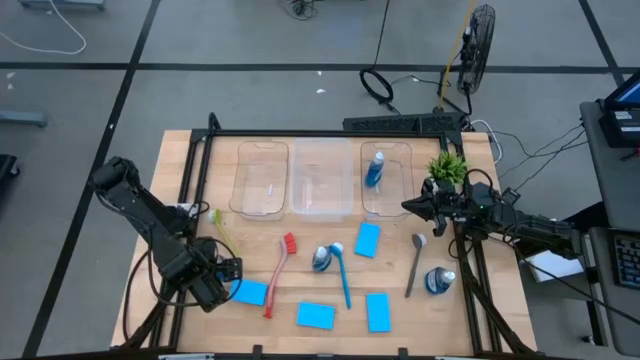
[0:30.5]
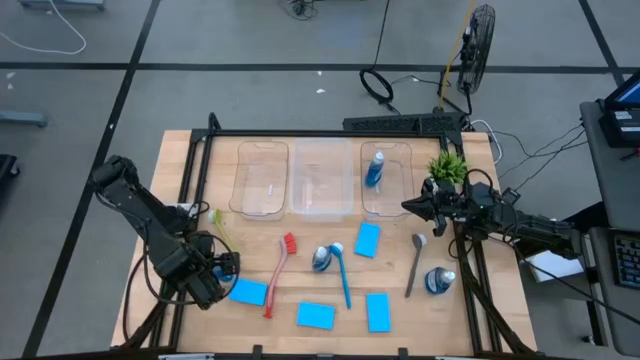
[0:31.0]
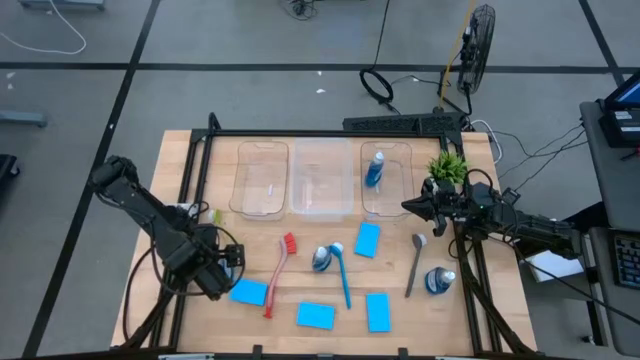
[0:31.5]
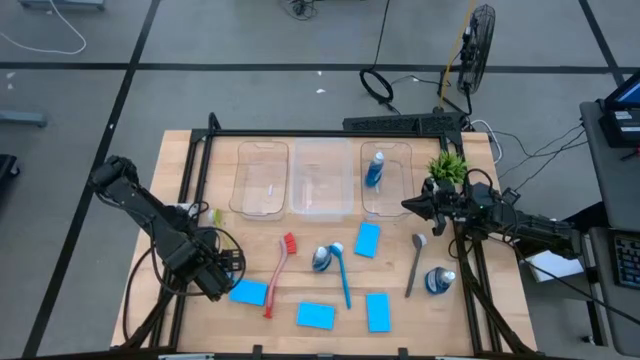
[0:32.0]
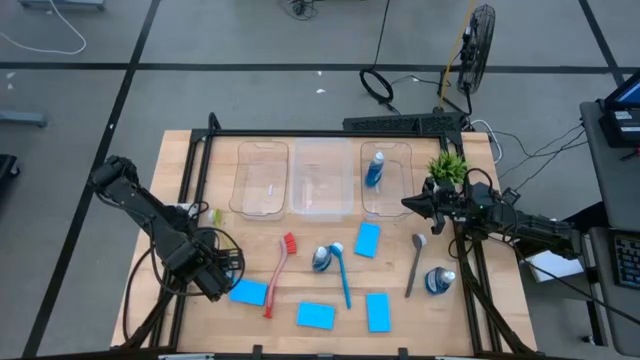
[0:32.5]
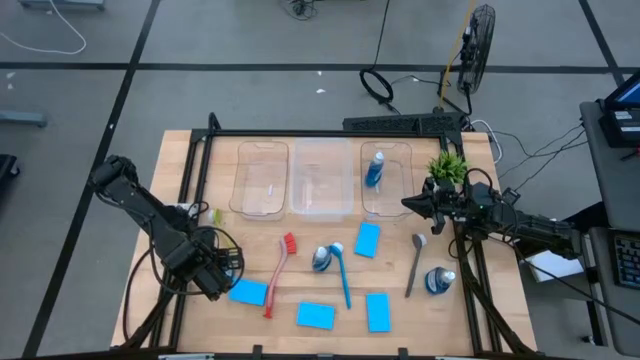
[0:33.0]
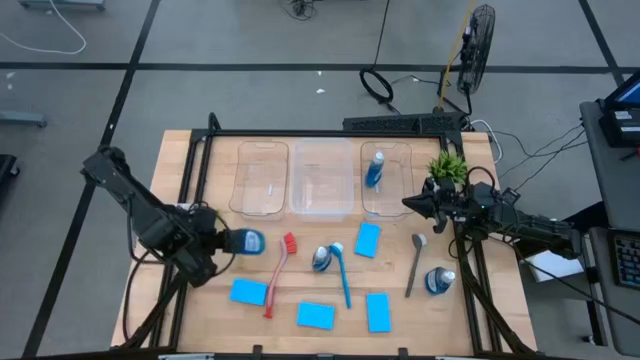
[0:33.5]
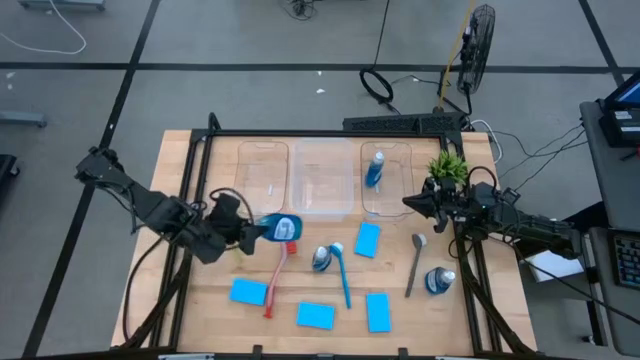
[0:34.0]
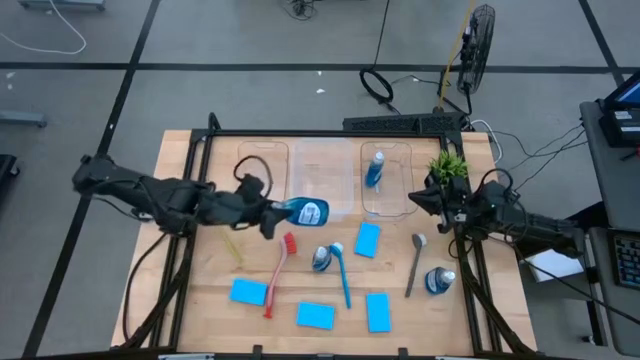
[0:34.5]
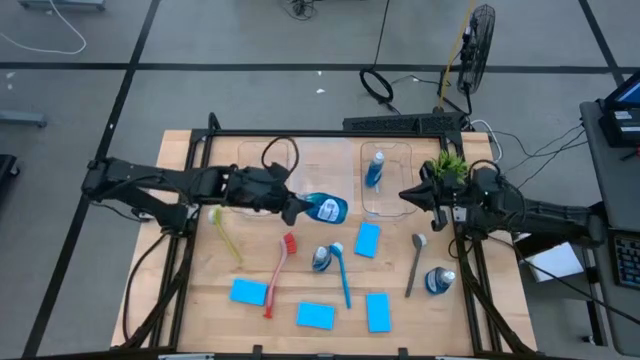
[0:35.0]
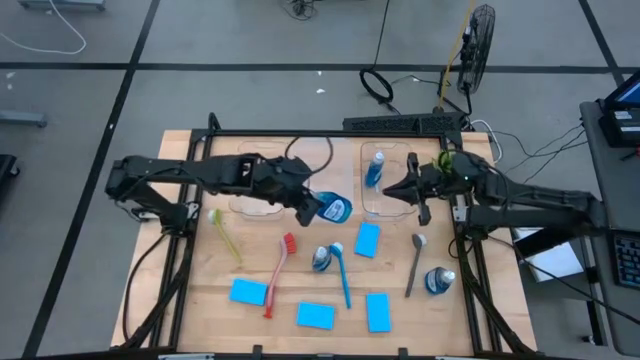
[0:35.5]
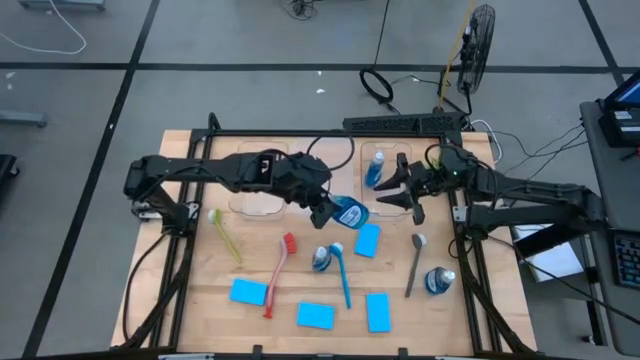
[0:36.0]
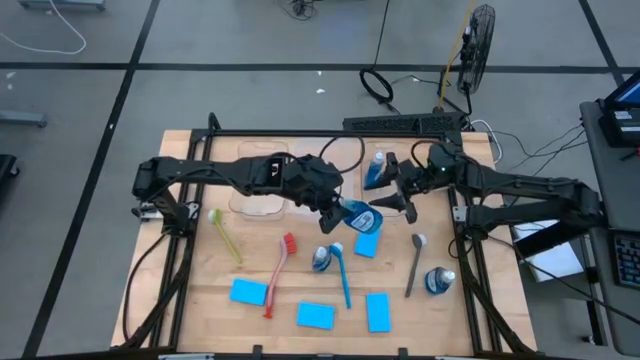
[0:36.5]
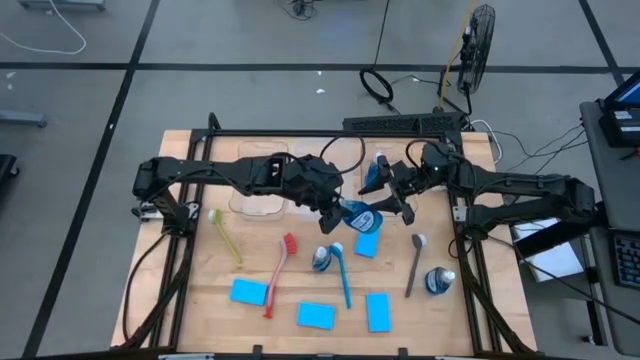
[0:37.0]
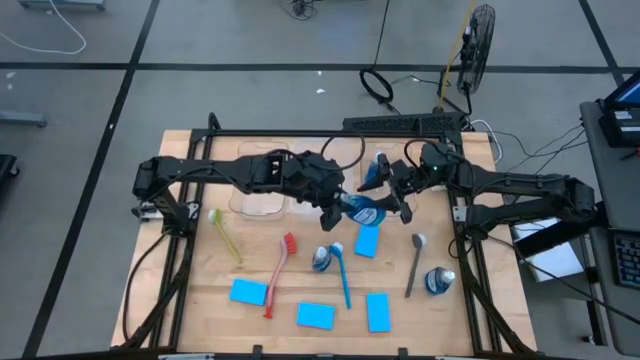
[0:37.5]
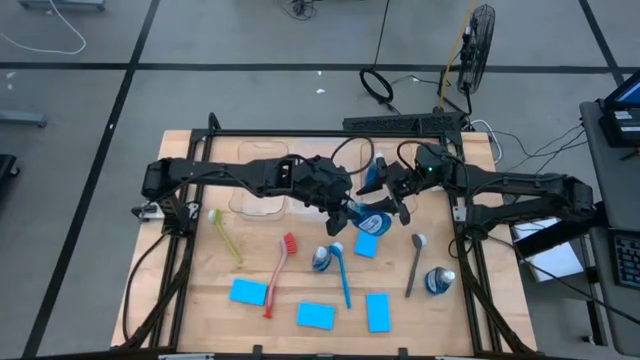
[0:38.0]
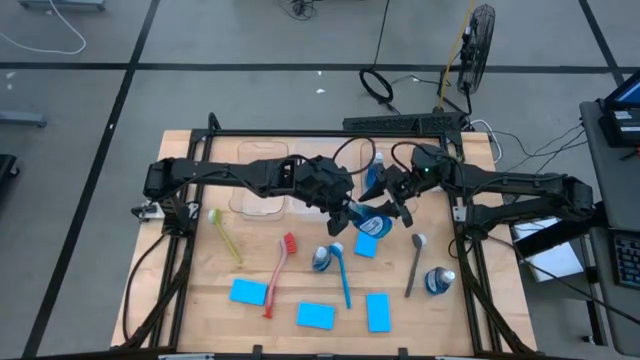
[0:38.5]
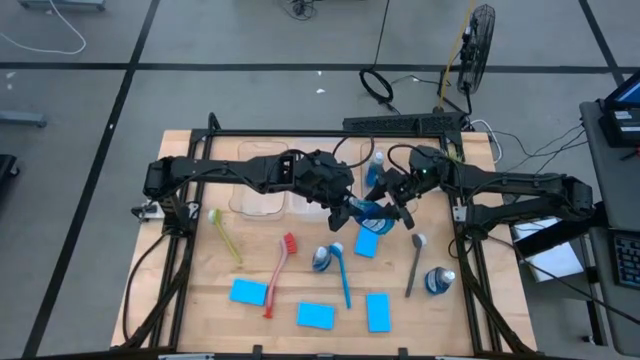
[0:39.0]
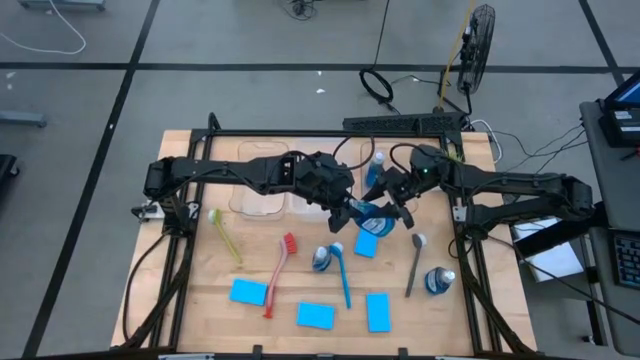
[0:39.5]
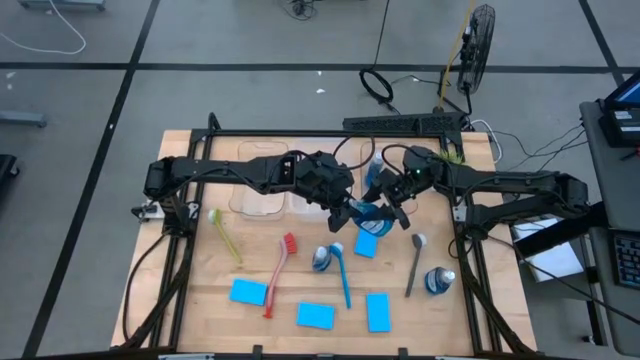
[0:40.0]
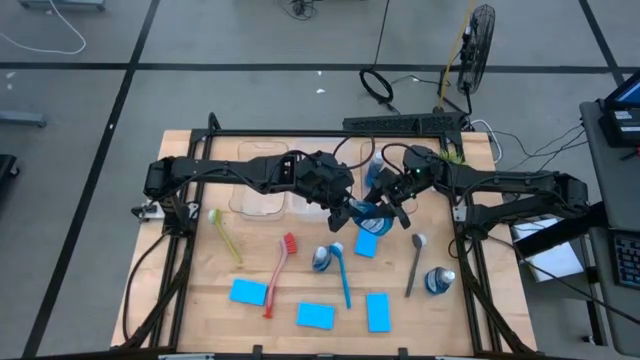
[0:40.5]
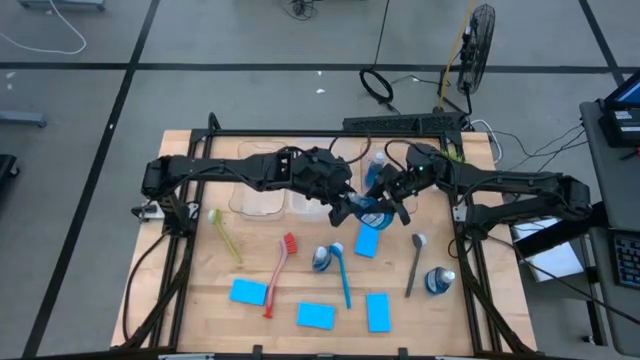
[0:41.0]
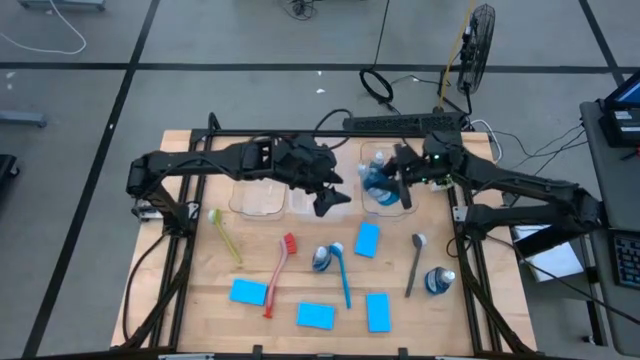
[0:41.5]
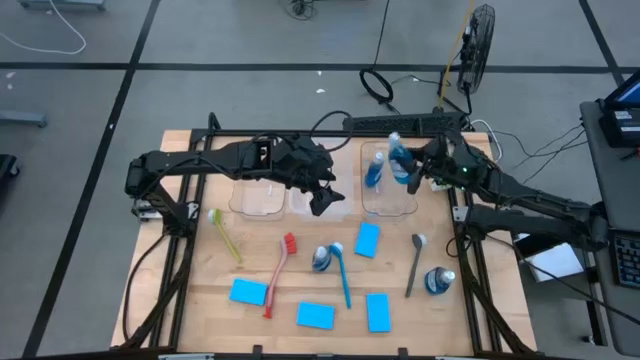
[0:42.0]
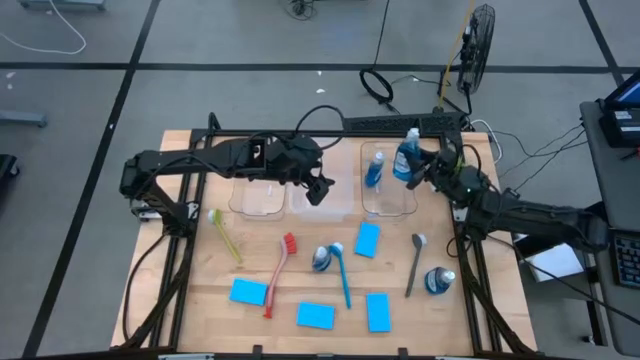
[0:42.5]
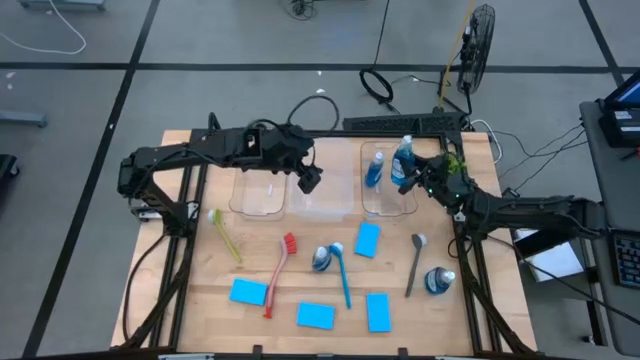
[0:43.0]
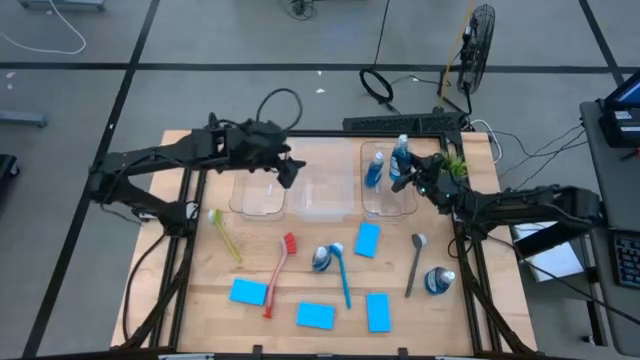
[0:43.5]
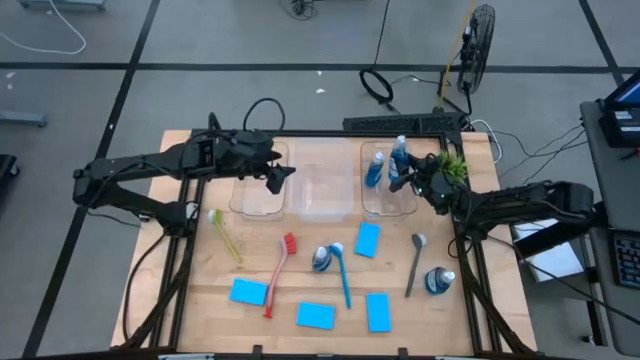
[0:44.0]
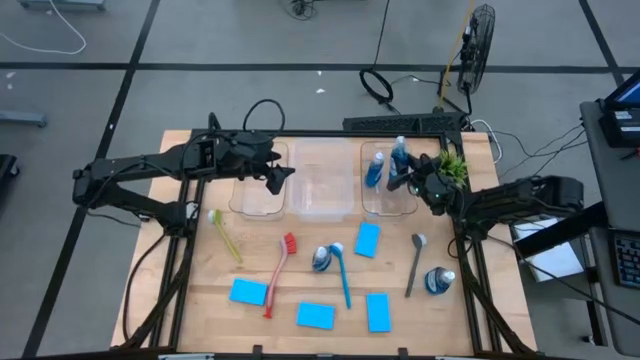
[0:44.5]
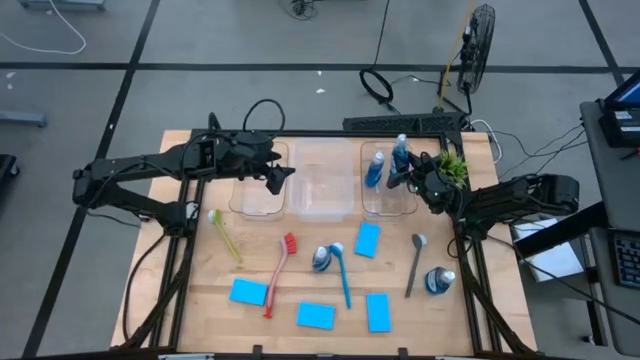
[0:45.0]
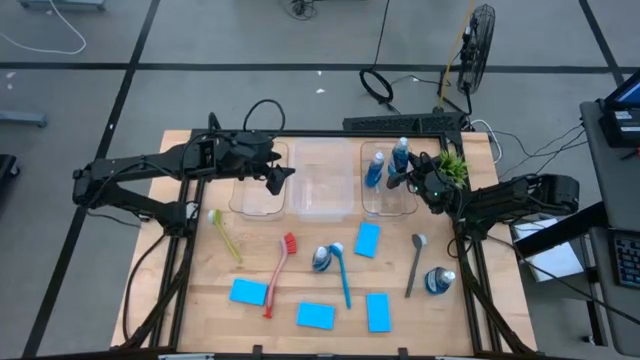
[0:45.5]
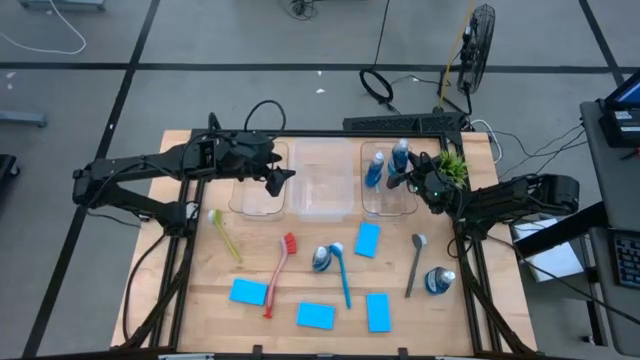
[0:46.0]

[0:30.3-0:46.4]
Task: Pick & Place Kitchen Sink Supplies
Put the blue dishwashing liquid bottle into the right transparent bin

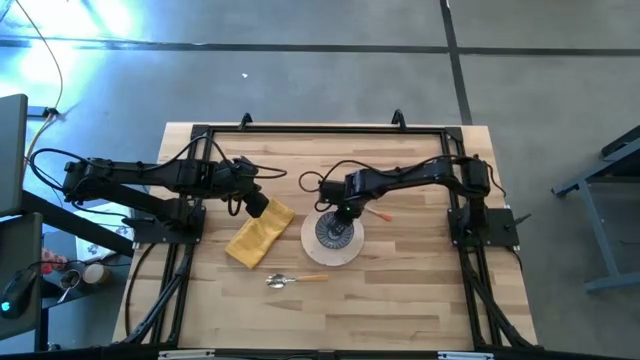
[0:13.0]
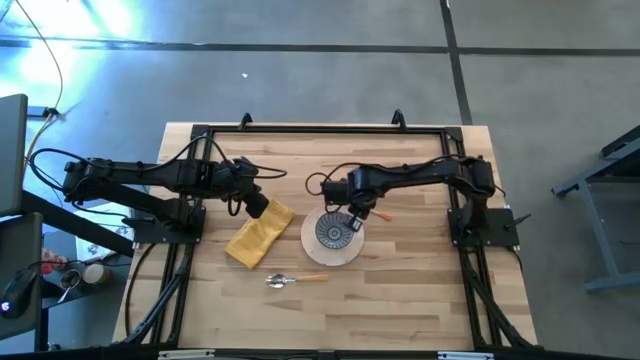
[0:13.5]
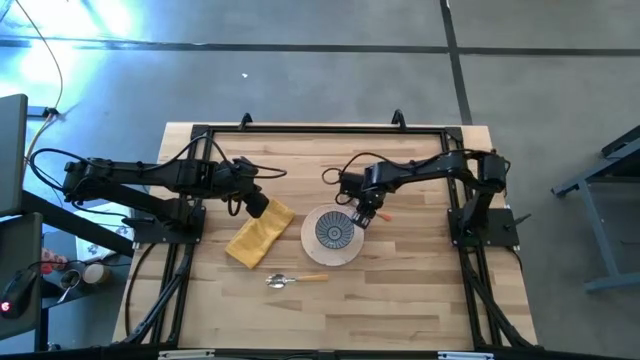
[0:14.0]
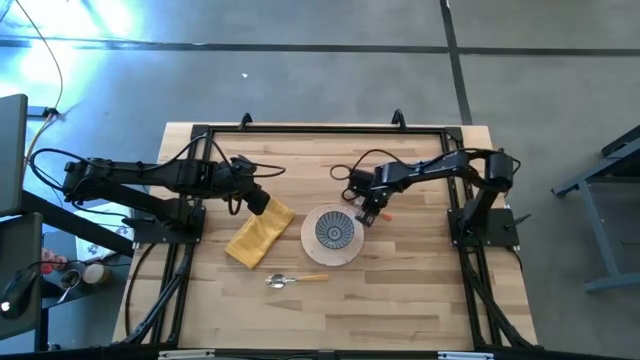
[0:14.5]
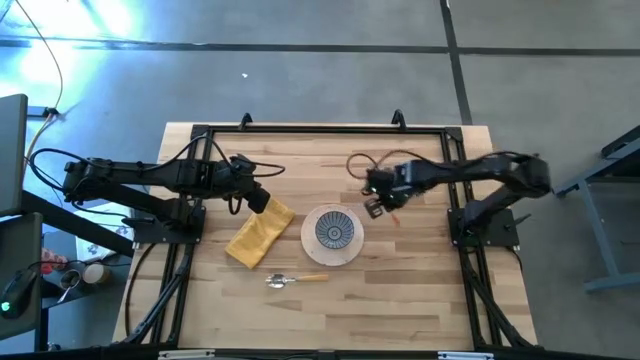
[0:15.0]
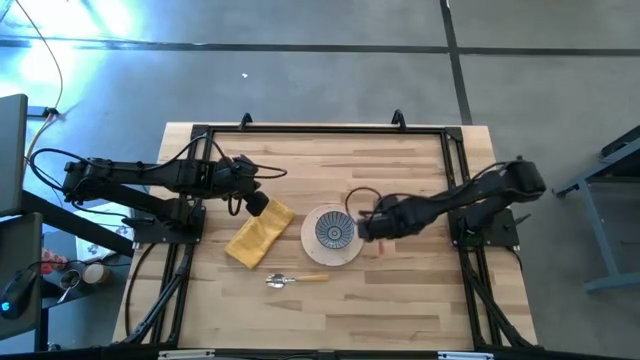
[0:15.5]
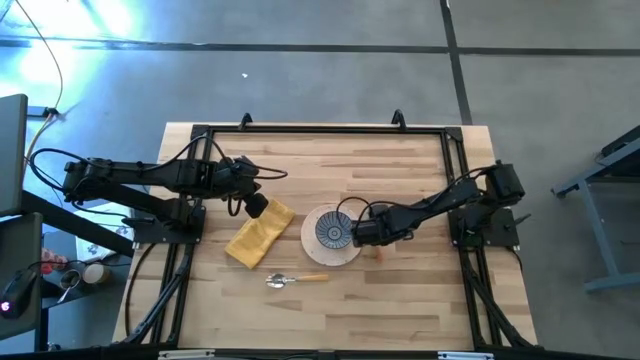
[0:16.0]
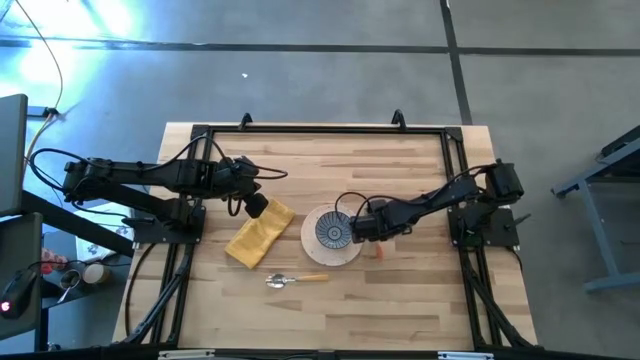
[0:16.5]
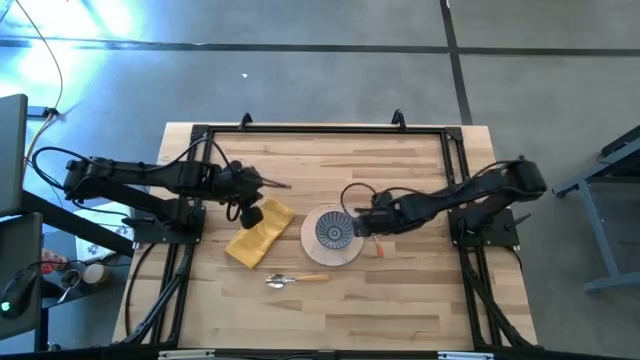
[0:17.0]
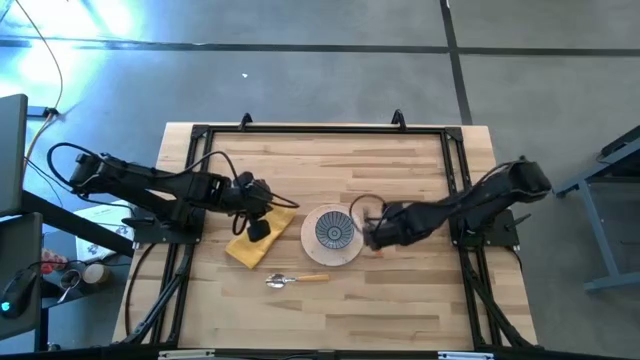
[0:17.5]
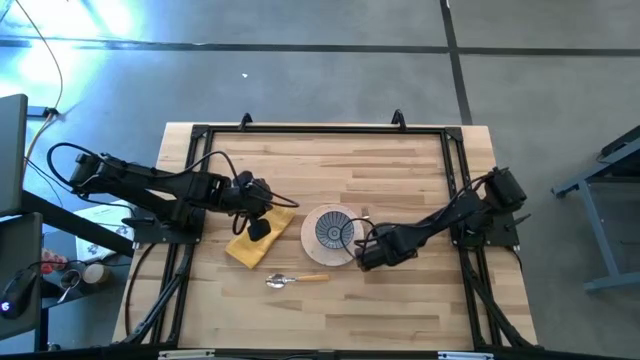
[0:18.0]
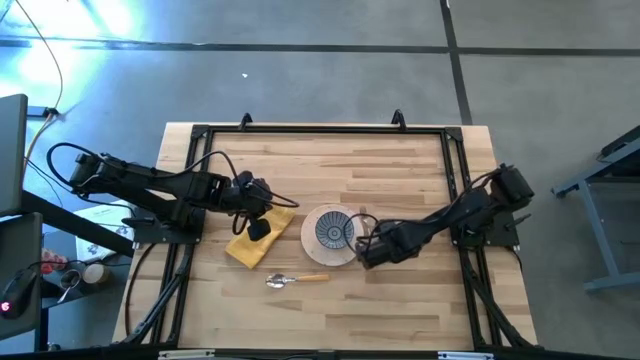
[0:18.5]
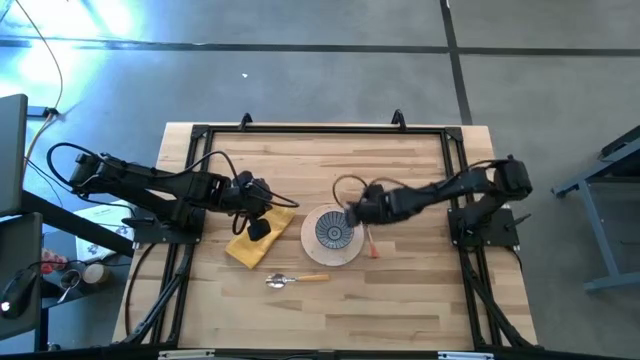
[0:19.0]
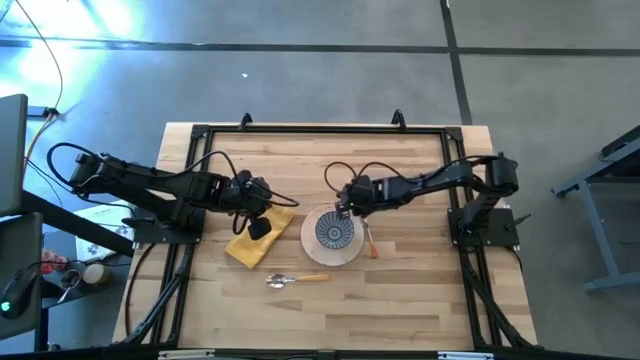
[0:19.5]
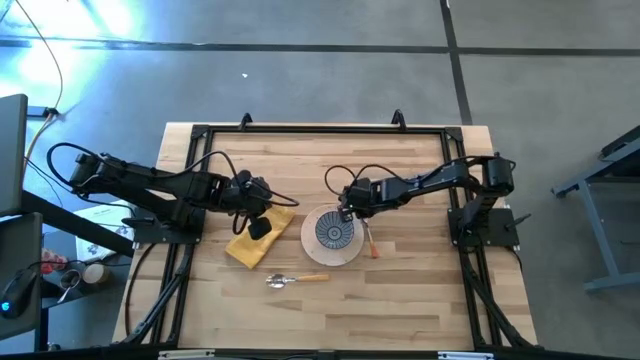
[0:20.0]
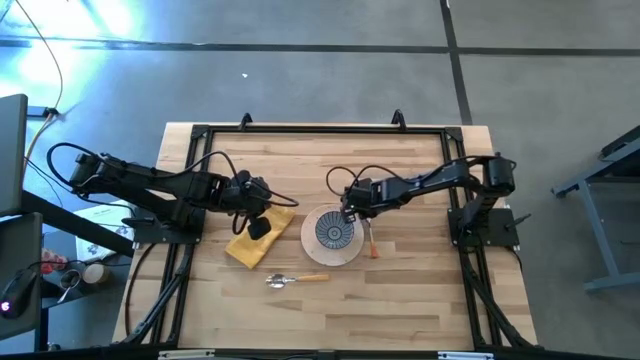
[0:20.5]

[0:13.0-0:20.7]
Task: Set table place
Put the orange fork to the right side of the white patterned plate
